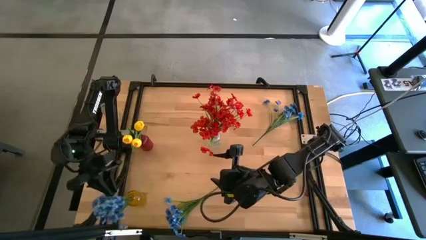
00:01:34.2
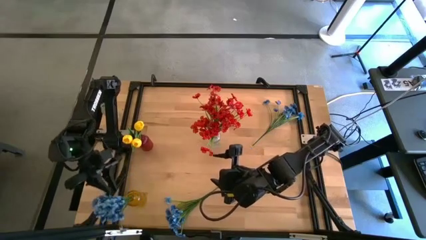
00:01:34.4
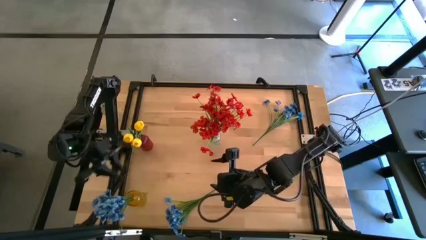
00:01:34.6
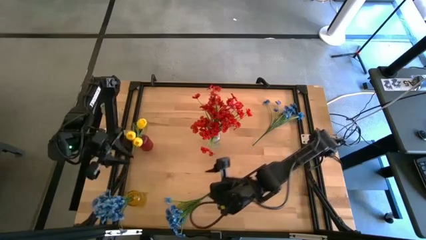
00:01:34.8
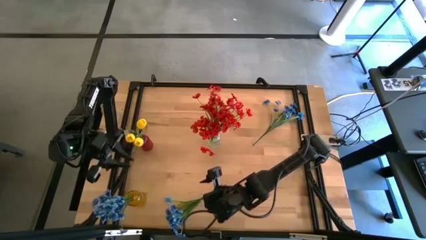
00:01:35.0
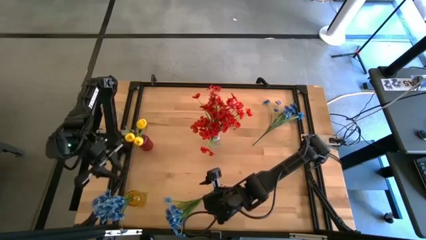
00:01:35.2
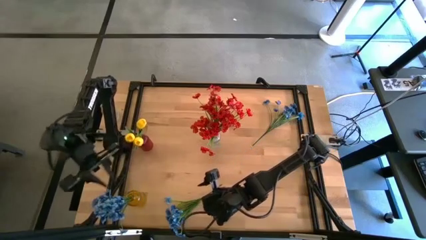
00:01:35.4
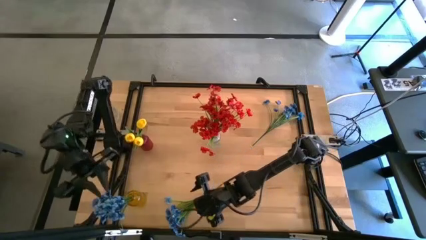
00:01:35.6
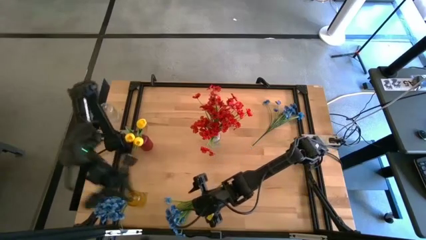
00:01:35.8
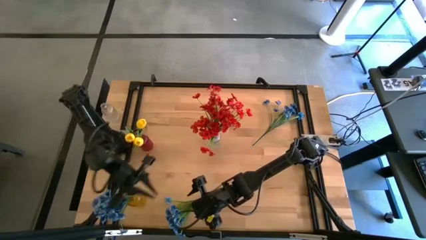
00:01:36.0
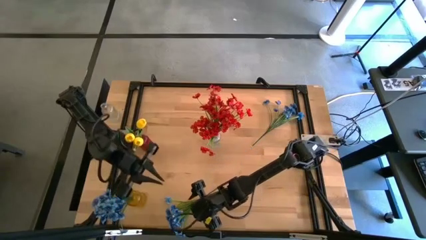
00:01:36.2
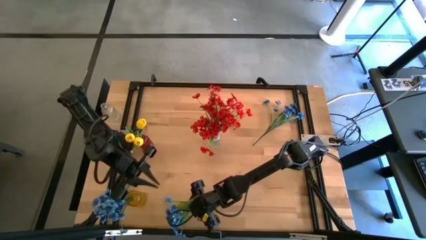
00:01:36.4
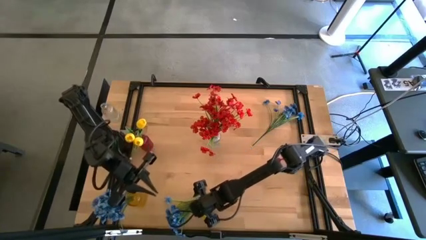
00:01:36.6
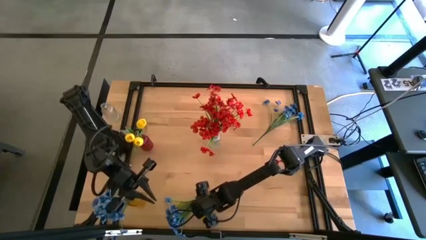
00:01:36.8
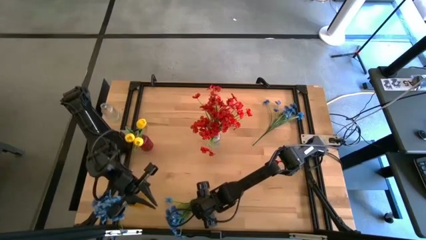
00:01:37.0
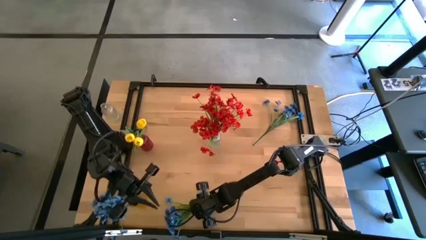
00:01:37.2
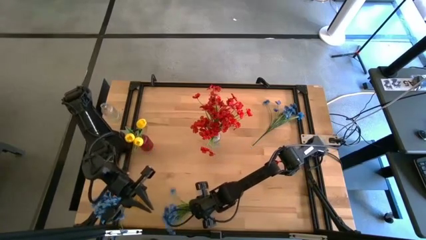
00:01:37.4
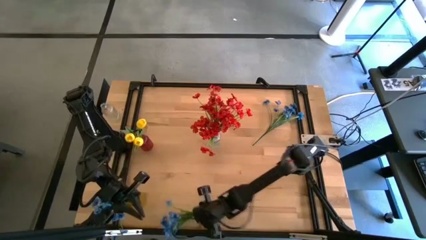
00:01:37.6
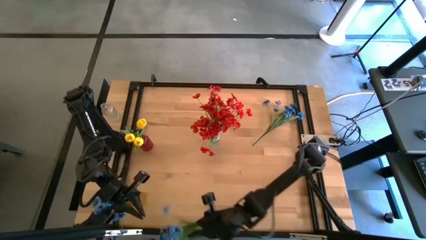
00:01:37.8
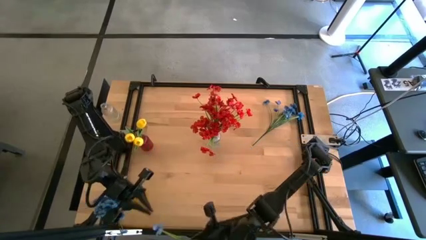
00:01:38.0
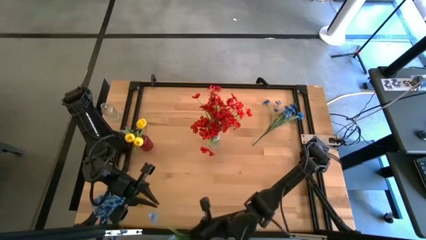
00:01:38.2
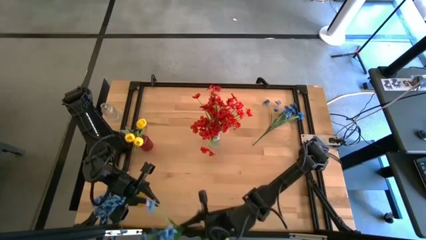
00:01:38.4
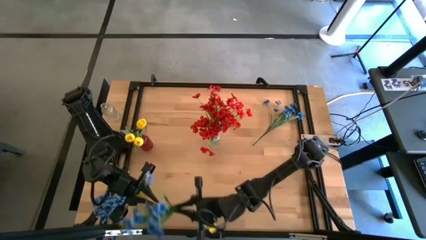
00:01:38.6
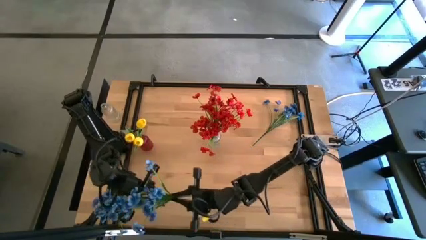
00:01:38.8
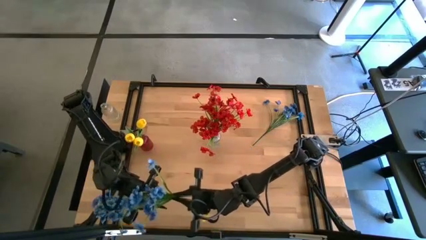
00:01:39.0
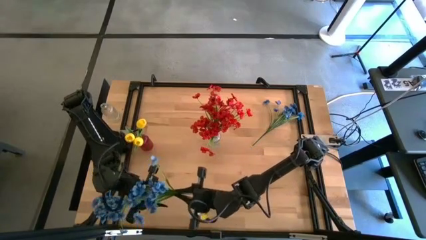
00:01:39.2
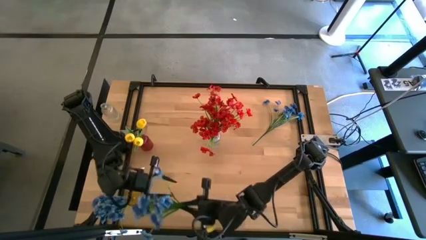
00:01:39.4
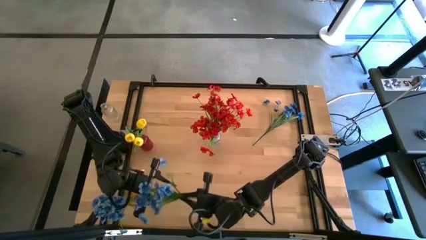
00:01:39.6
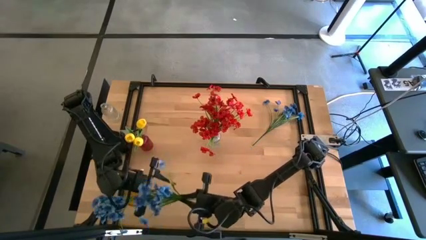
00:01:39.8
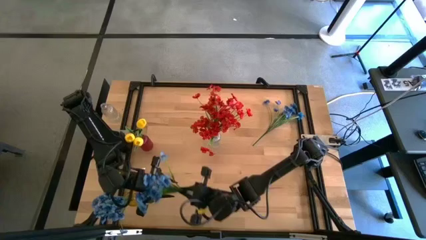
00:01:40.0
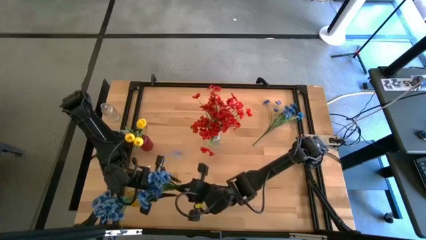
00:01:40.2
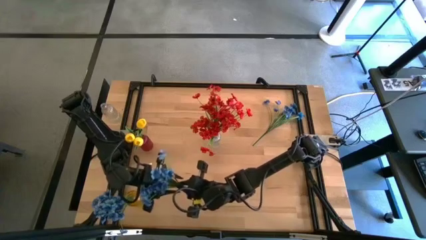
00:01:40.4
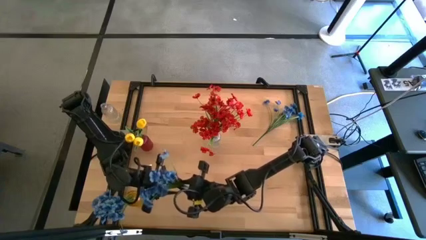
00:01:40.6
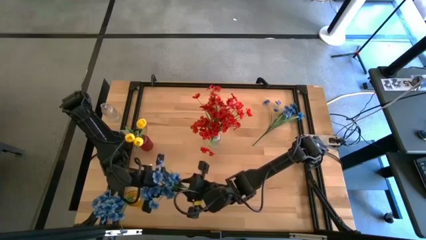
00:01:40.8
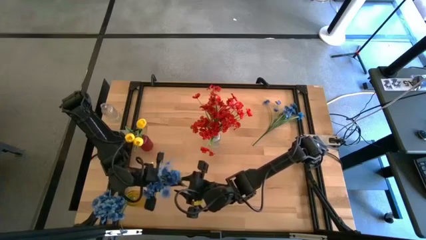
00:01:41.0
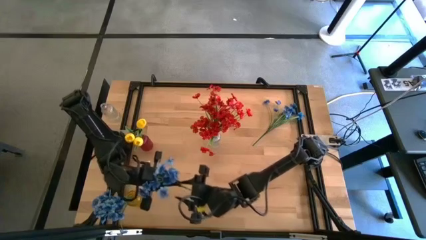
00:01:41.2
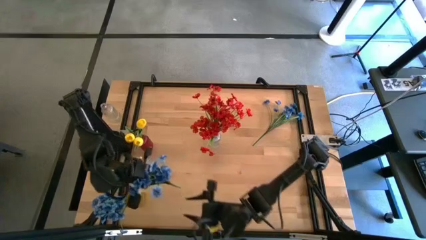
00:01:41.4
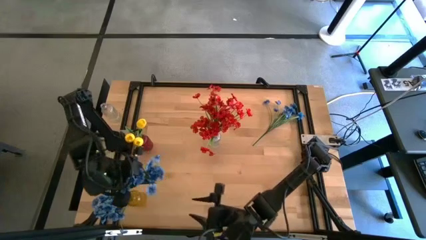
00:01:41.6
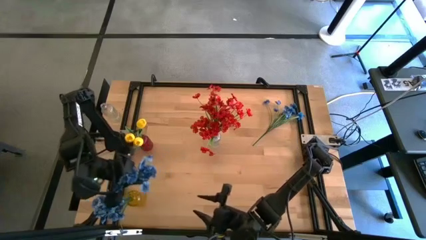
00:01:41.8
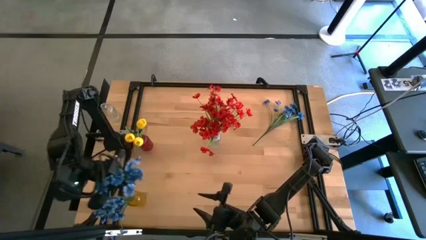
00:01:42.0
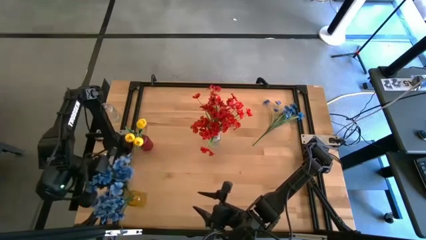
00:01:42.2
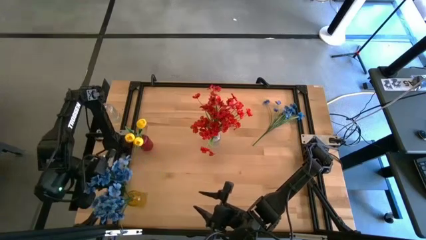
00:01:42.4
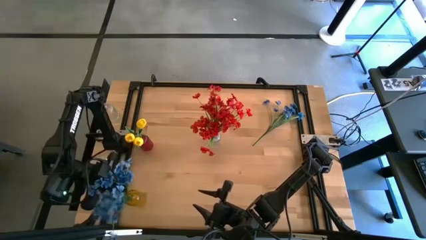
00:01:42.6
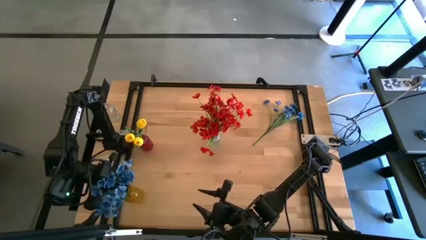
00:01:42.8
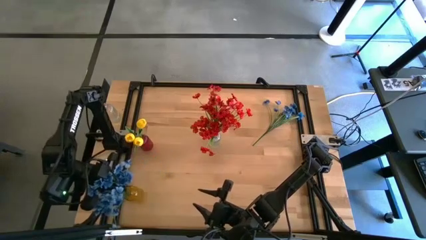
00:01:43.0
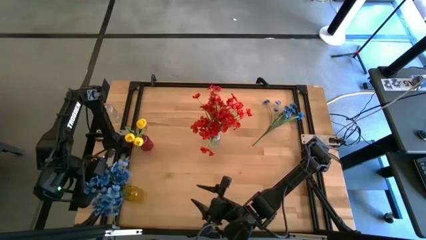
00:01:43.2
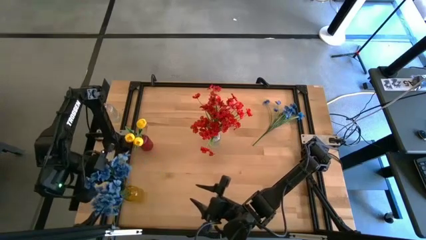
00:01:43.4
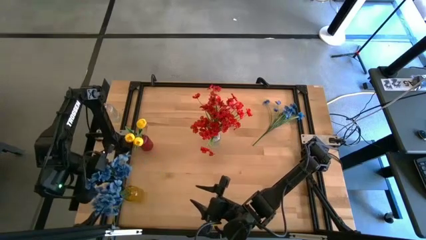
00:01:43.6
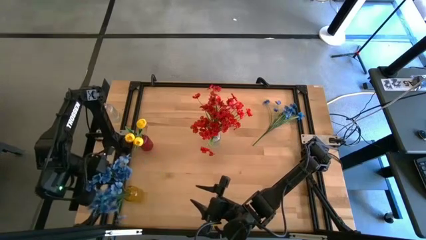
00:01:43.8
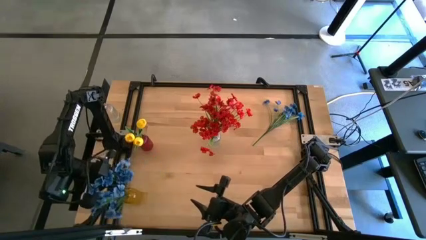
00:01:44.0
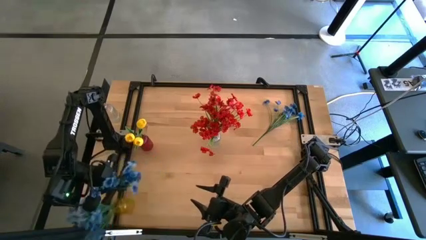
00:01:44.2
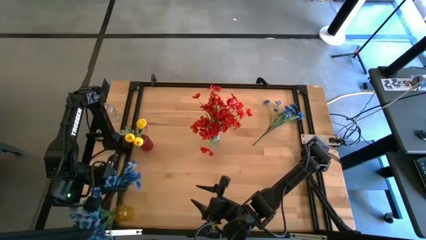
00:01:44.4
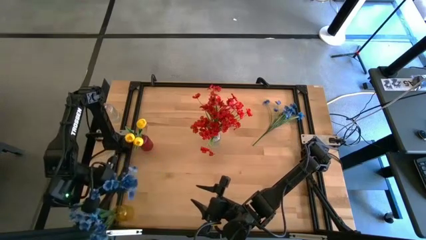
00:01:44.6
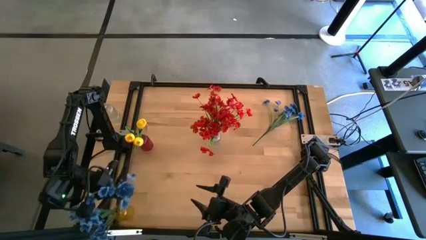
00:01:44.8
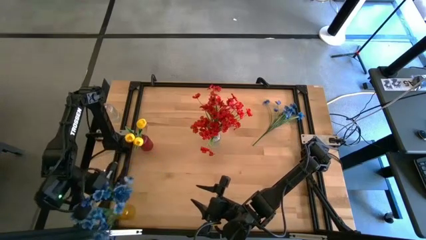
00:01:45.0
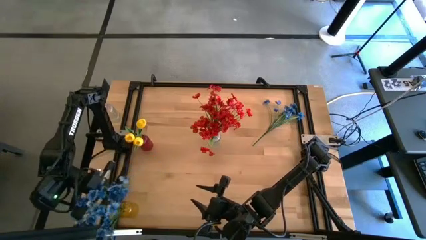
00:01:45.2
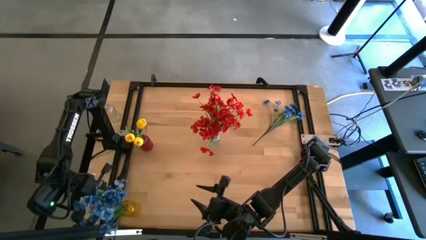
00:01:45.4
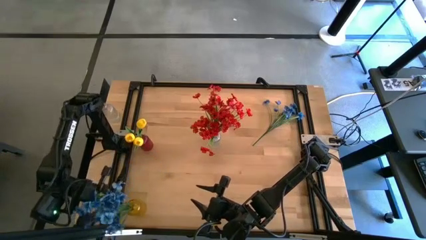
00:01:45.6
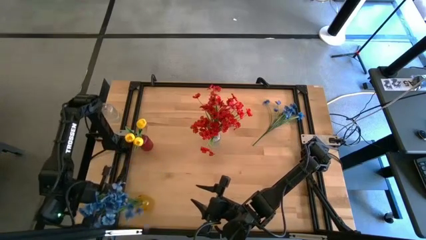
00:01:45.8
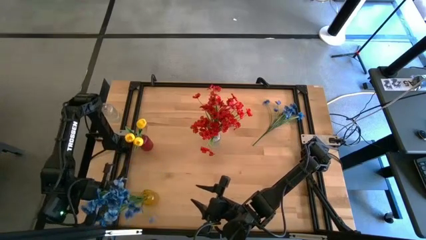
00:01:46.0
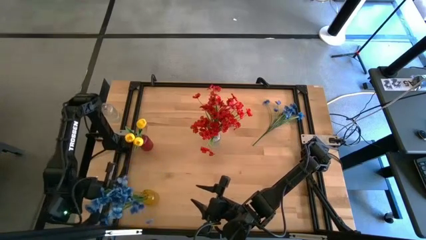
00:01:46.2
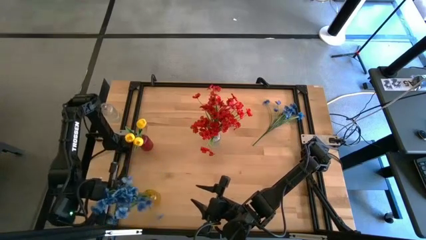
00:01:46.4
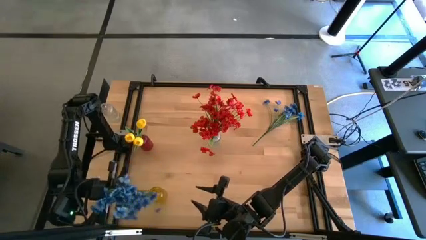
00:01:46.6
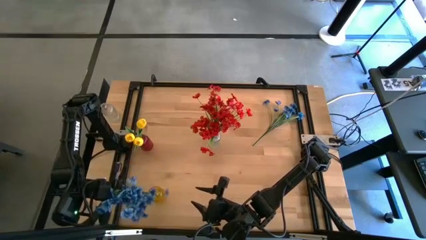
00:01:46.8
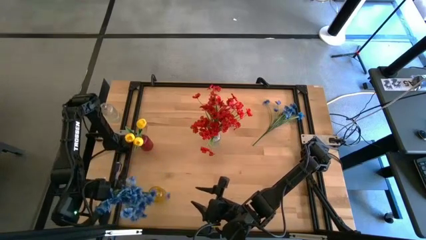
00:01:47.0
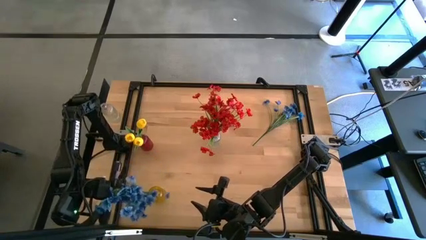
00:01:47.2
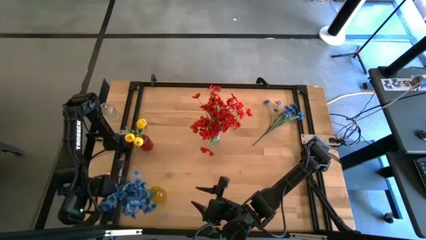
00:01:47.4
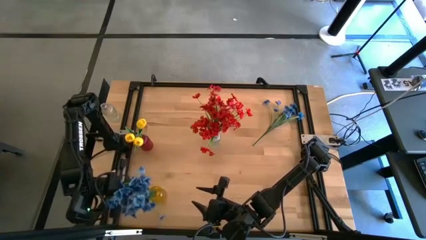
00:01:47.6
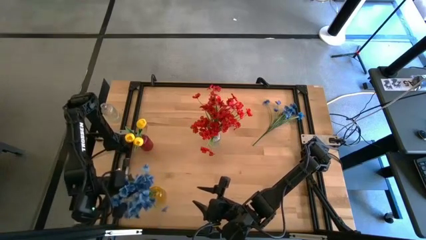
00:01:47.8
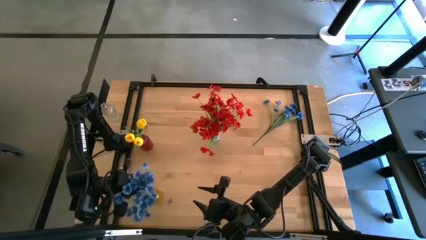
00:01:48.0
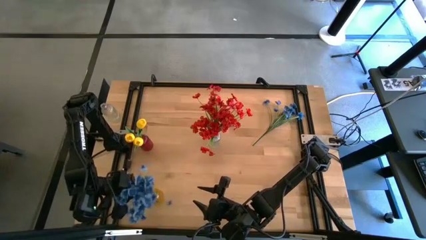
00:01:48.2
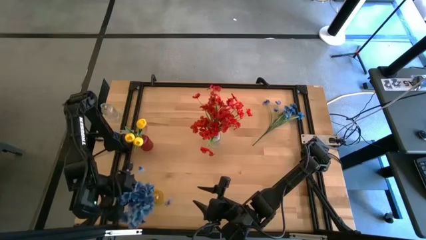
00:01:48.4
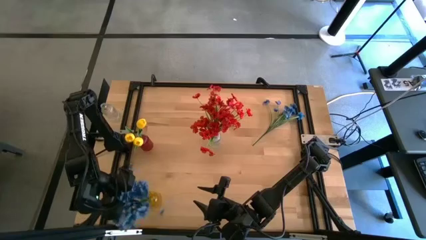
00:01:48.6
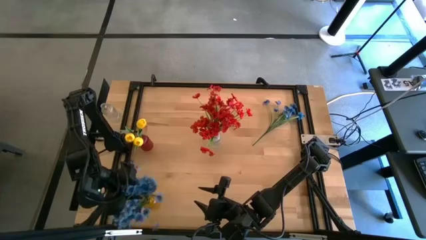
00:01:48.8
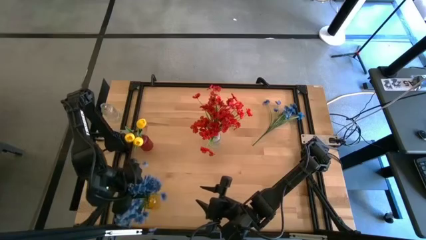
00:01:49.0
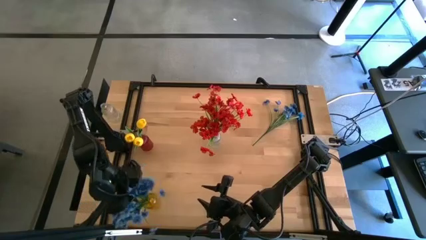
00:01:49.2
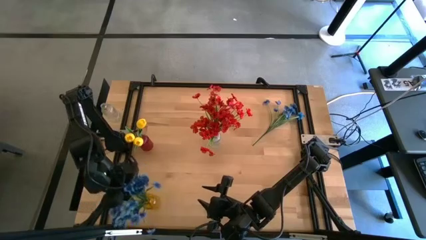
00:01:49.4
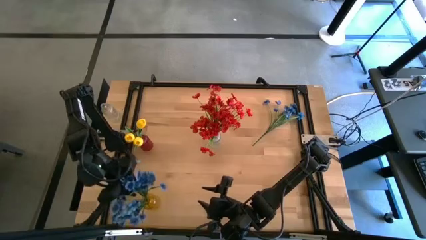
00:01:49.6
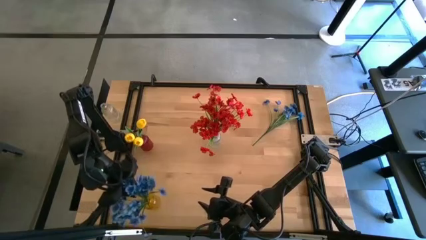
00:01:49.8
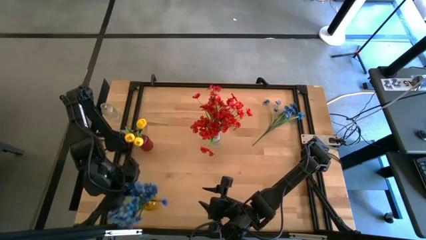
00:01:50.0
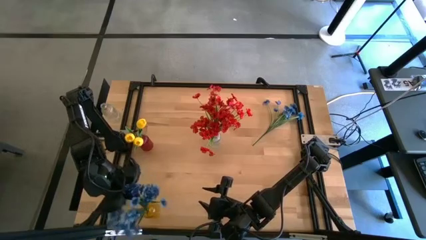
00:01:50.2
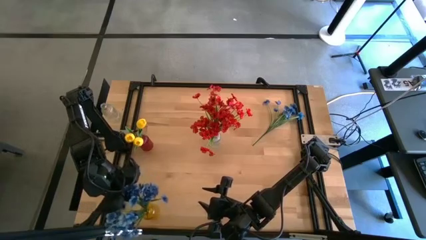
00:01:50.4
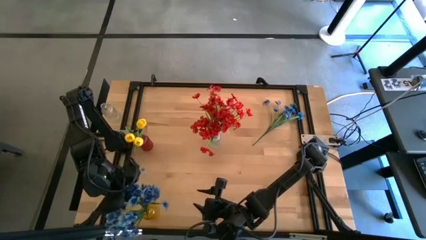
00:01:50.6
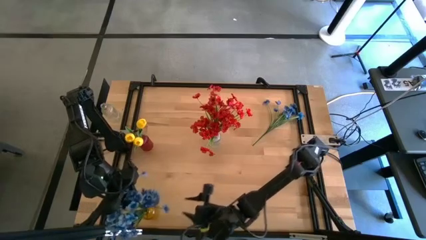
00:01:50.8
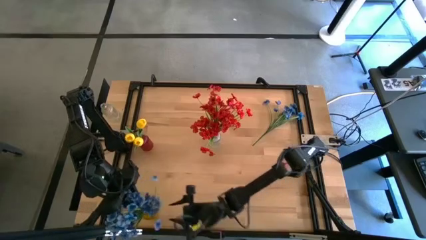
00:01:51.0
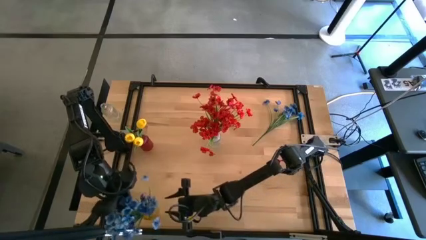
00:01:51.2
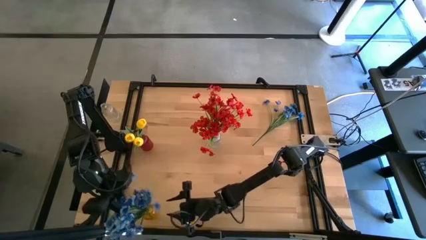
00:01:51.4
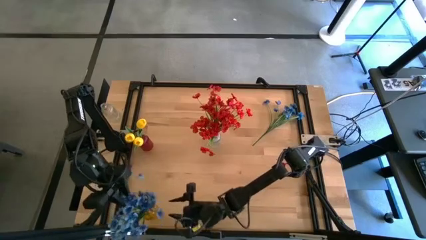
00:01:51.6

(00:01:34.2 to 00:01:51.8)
Task: Sort flowers into vase by color
Put the bottom blue flower into the yellow vase
